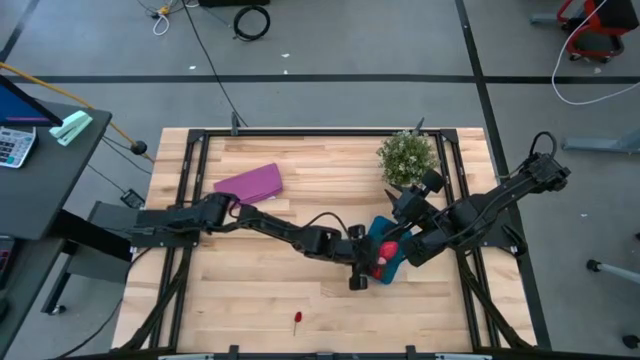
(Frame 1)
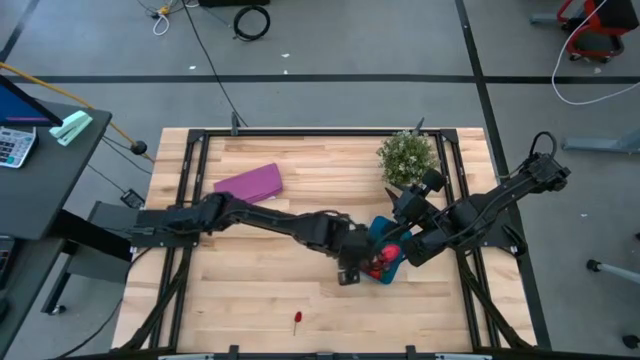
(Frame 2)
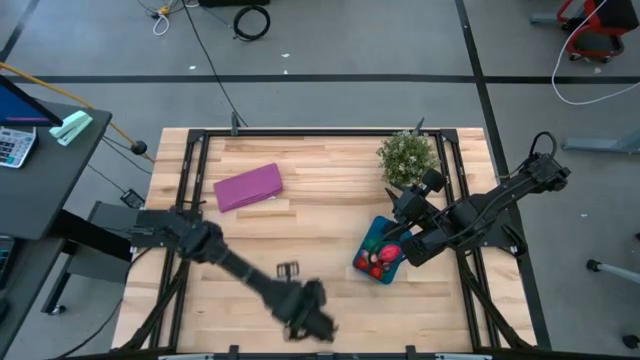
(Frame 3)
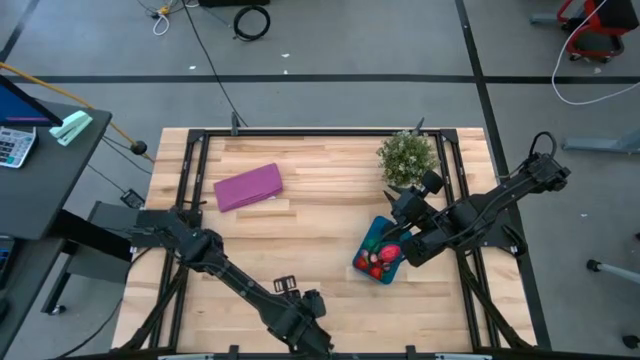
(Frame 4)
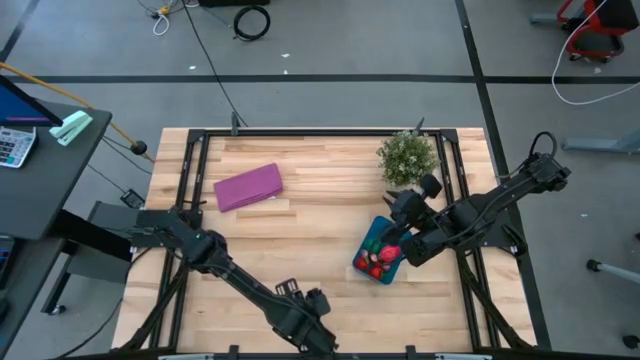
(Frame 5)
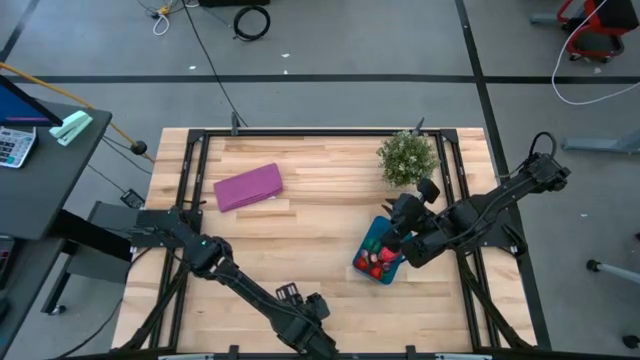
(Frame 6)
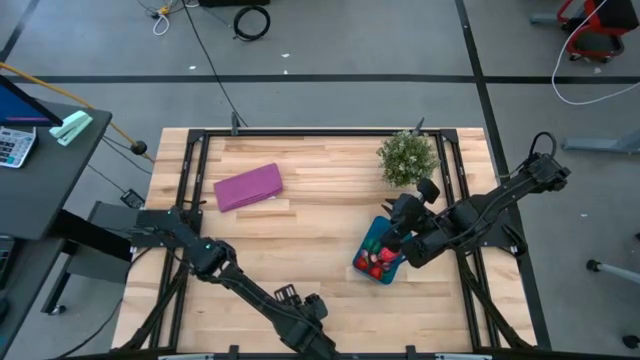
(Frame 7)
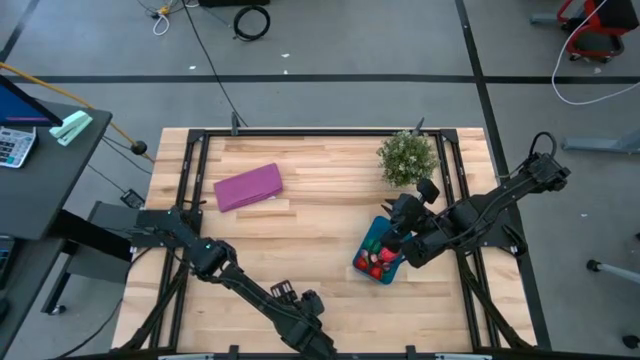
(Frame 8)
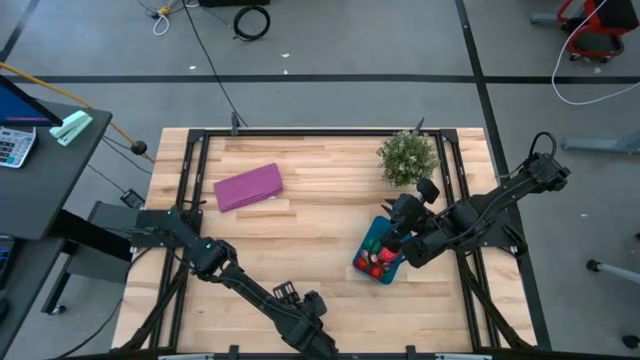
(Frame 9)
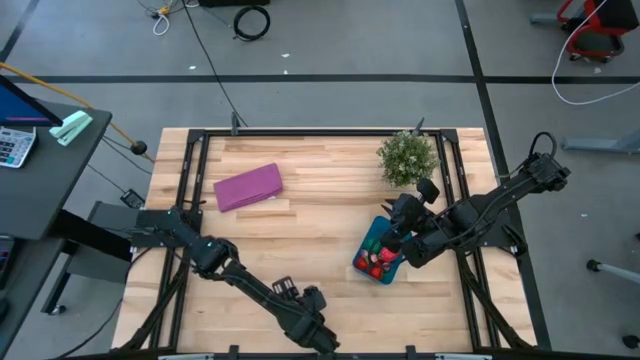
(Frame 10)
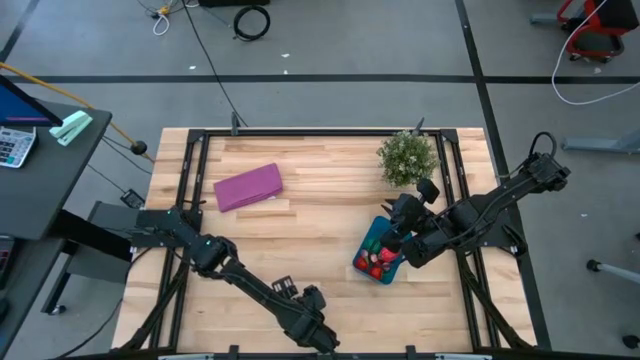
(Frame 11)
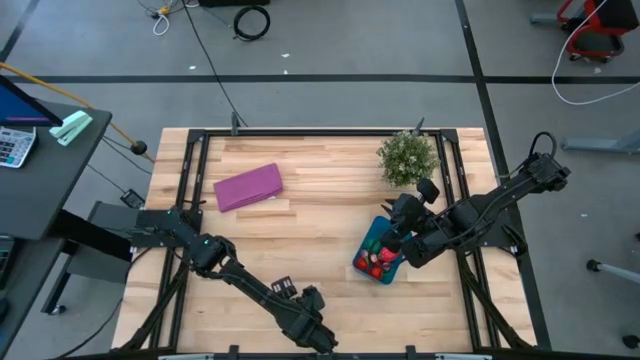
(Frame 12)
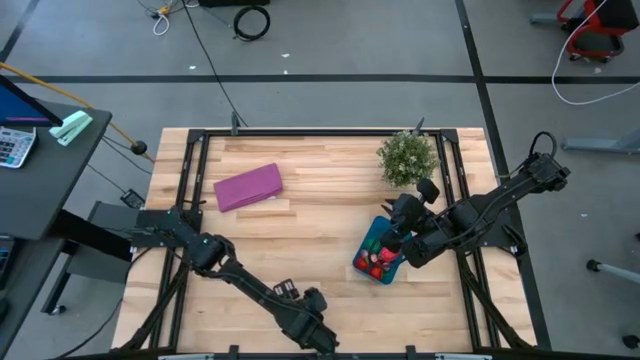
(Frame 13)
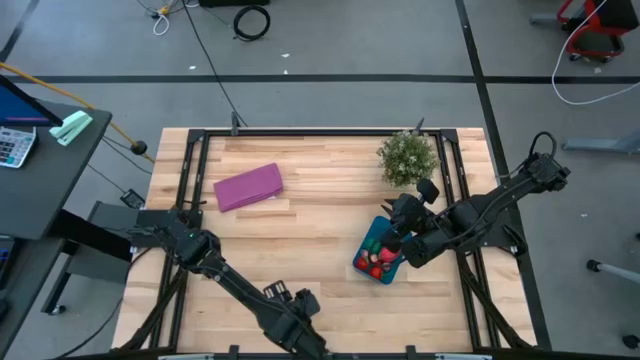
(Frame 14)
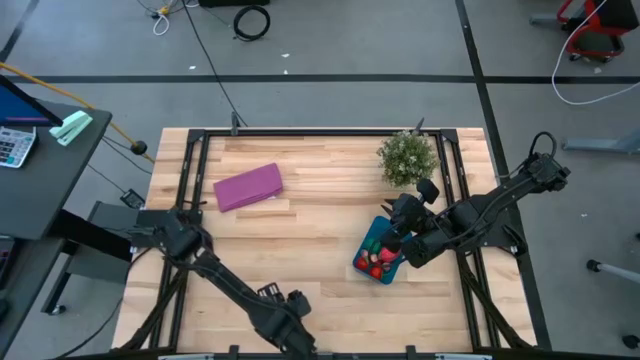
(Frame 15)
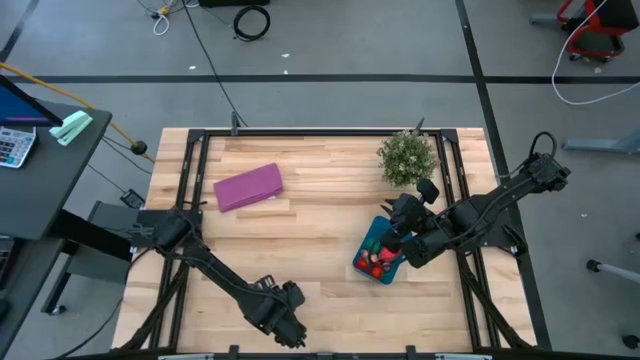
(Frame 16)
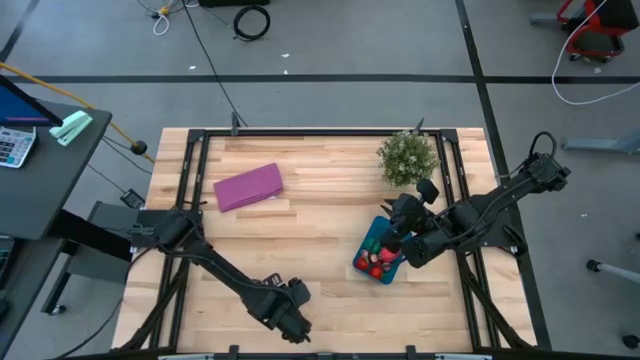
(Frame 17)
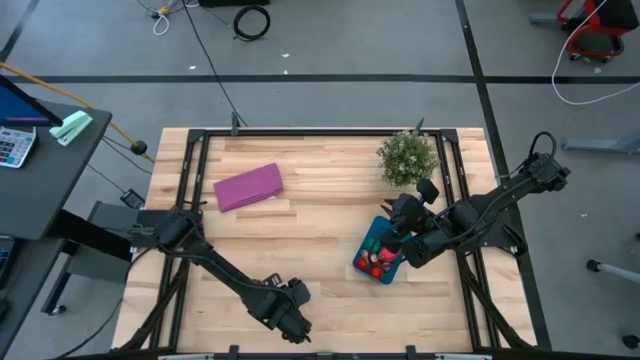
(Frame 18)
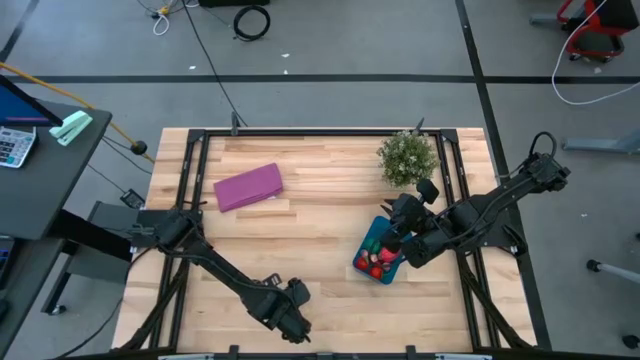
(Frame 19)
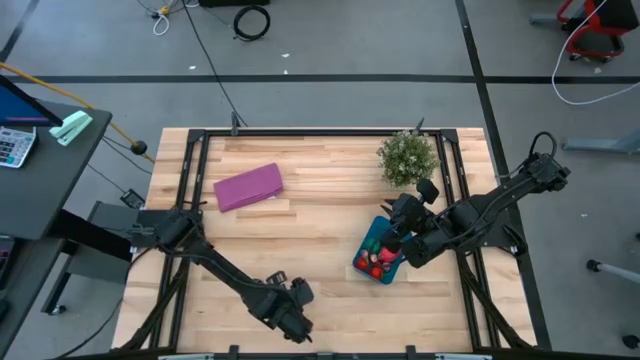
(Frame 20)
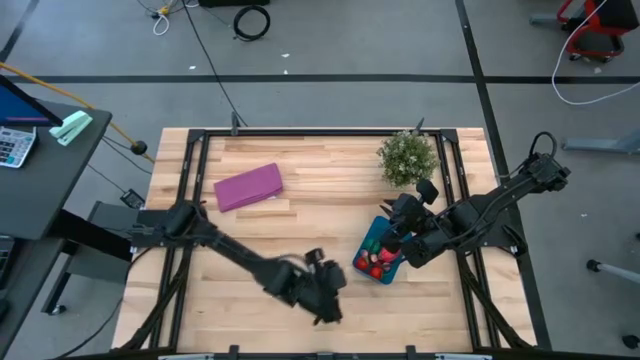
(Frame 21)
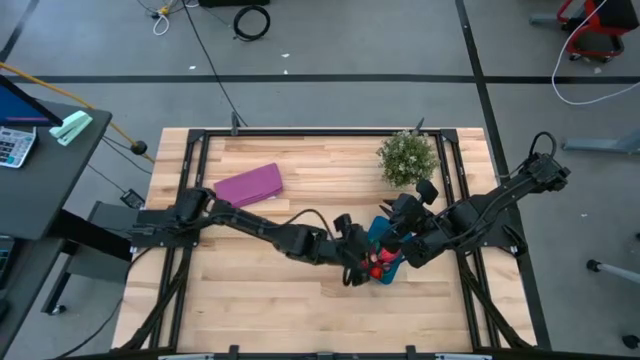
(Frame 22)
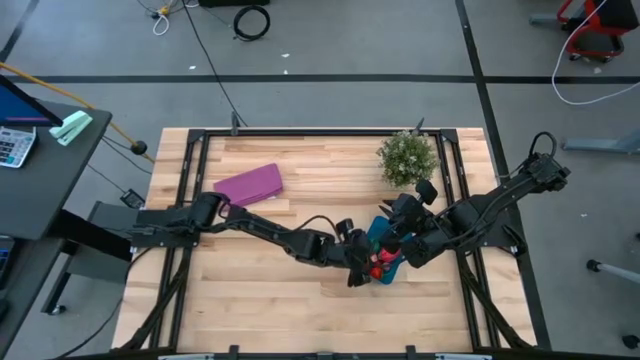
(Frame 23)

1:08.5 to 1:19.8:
Task: Pick and placing Produce into tupperware
Put the red cherry into the blue bin

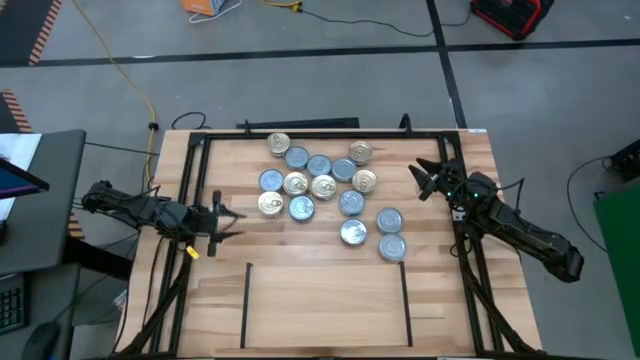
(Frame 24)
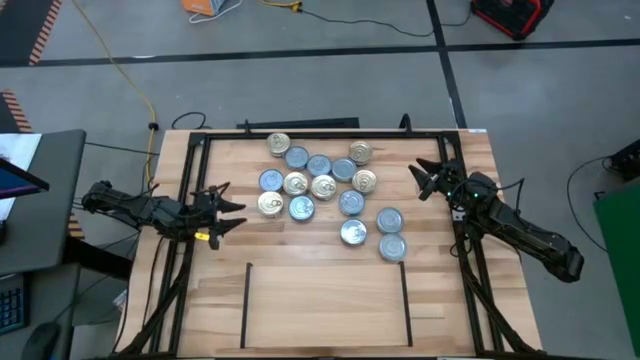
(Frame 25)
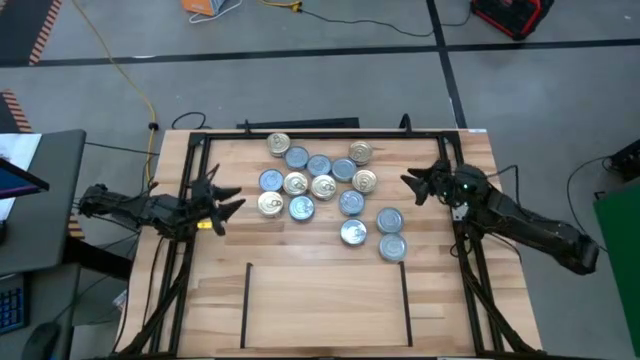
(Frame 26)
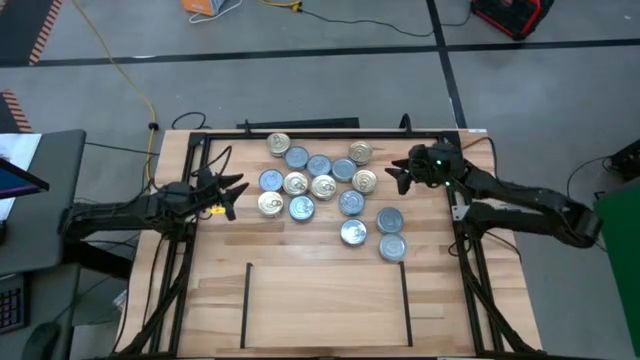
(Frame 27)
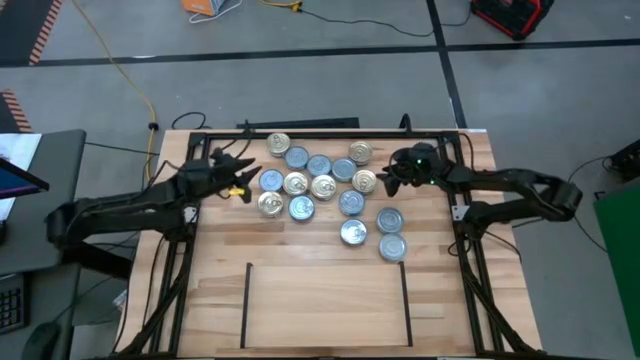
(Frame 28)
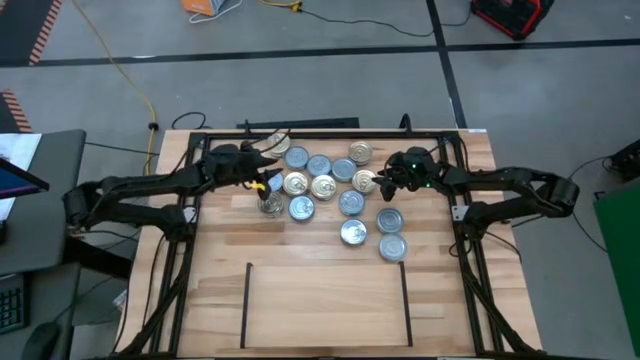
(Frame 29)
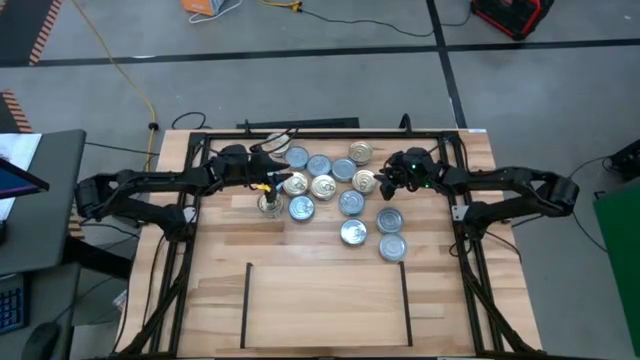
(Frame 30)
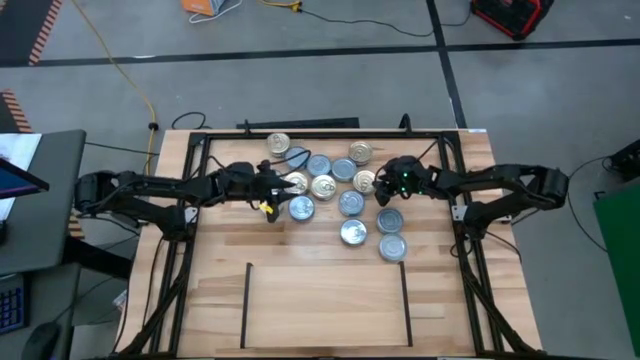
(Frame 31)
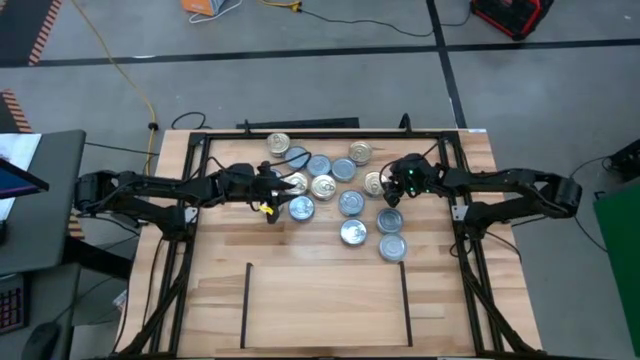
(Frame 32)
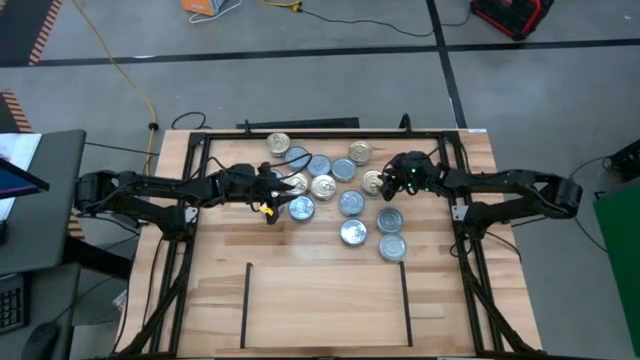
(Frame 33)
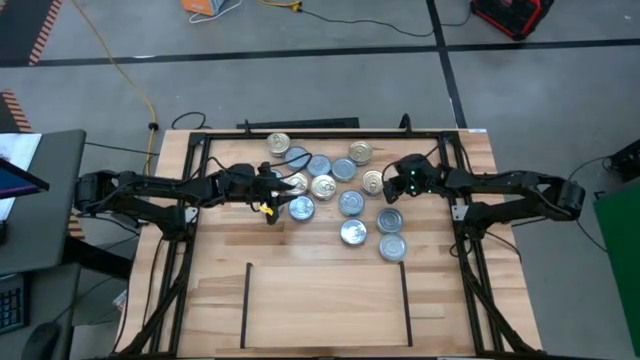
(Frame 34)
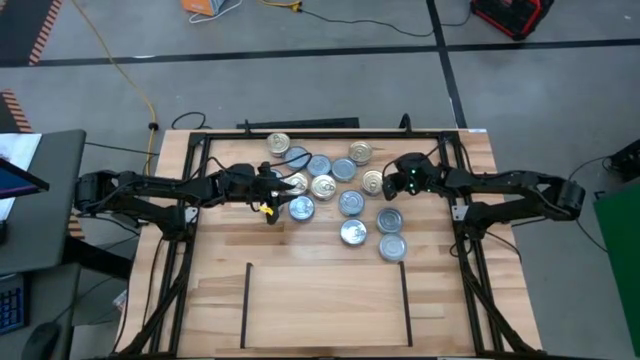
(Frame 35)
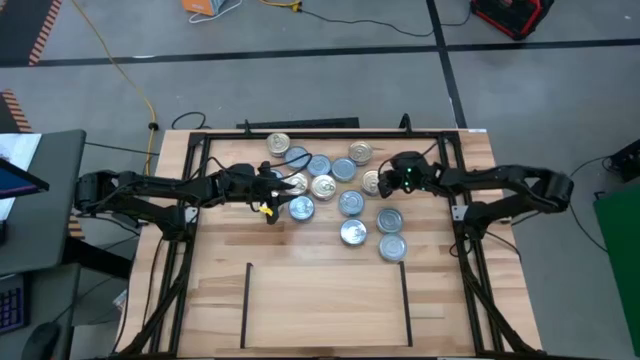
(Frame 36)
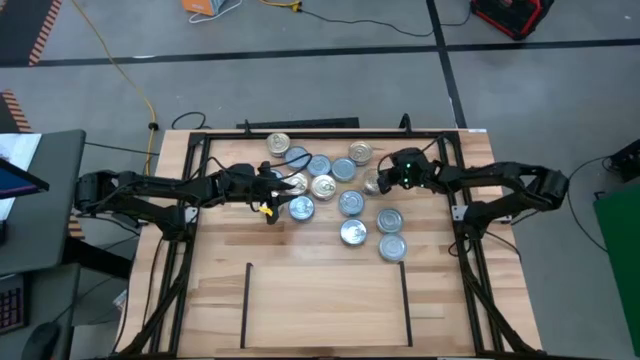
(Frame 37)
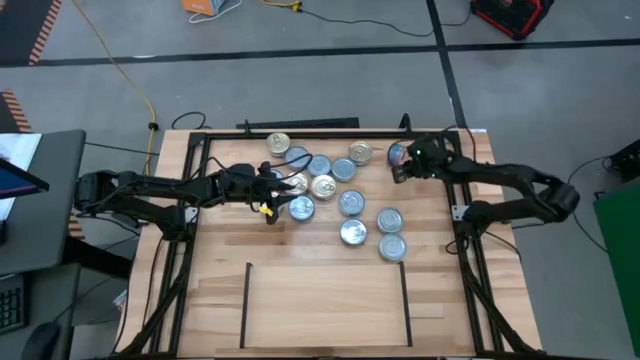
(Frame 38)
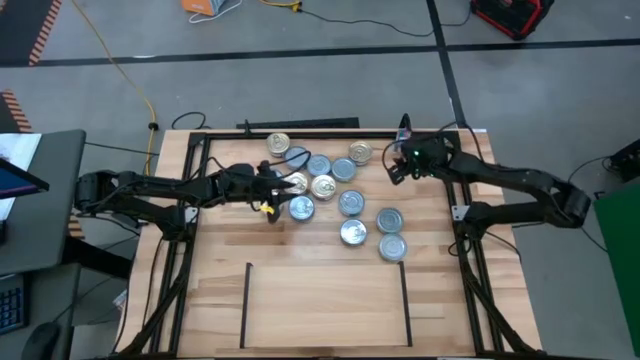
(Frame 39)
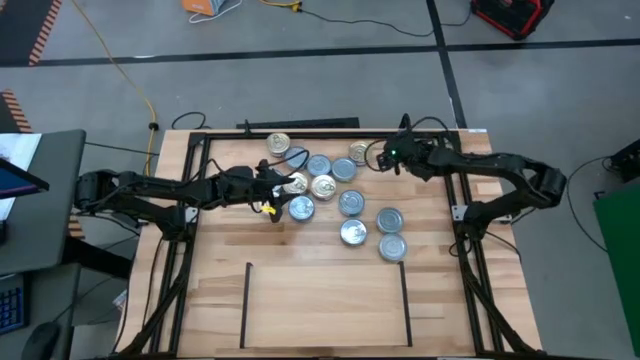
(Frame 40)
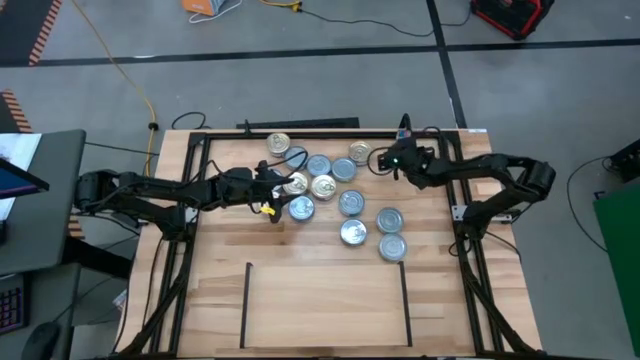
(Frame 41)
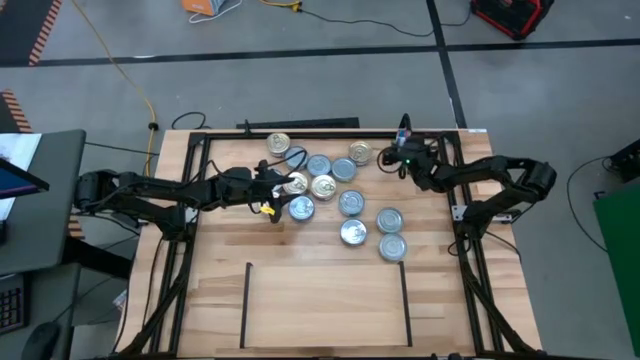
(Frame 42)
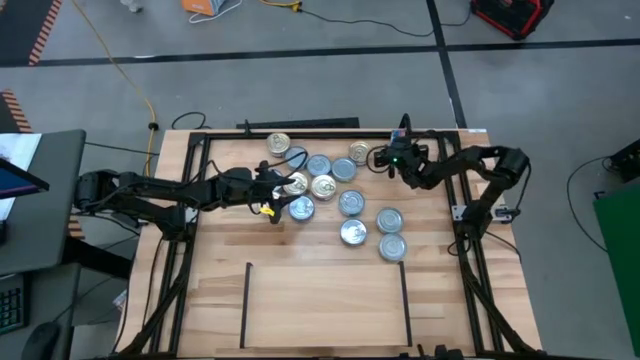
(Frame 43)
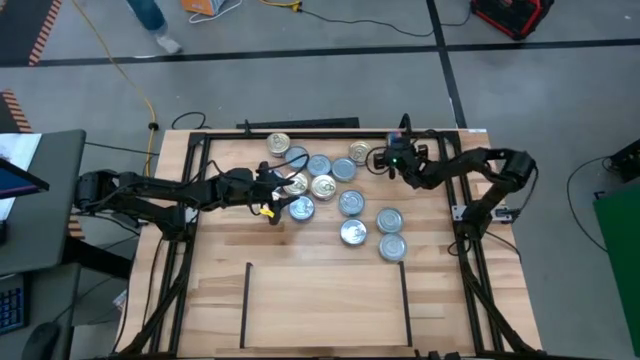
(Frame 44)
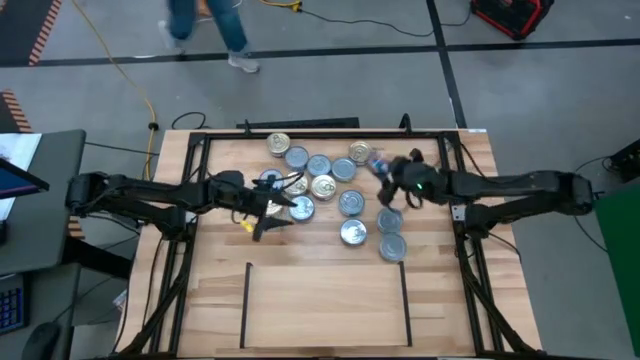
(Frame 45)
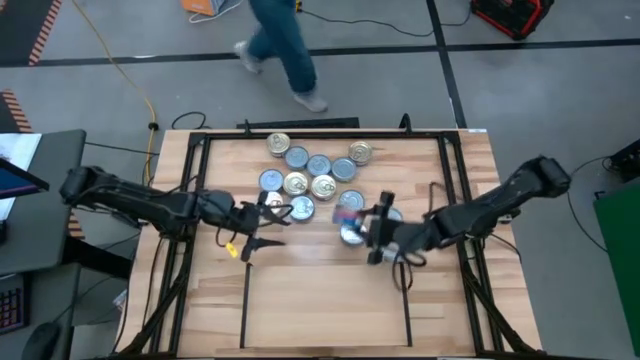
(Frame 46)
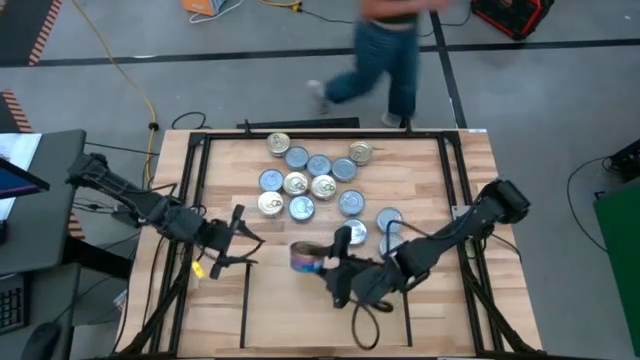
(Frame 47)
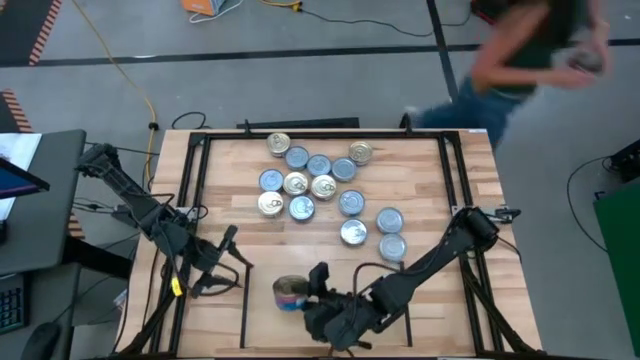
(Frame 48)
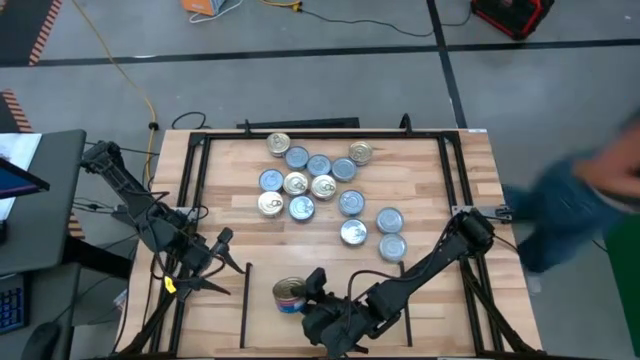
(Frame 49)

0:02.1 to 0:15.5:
Task: Stack canned seafood by type on shelf
Put the blue and pink tuna can on the shelf
